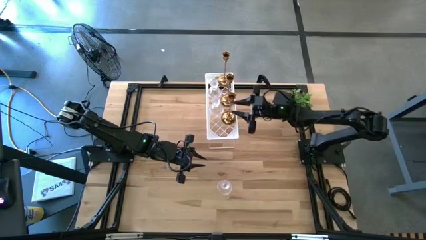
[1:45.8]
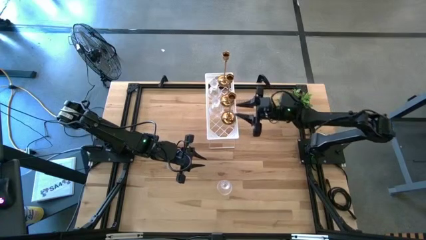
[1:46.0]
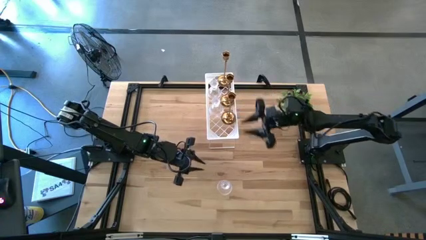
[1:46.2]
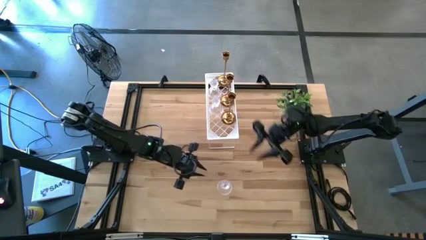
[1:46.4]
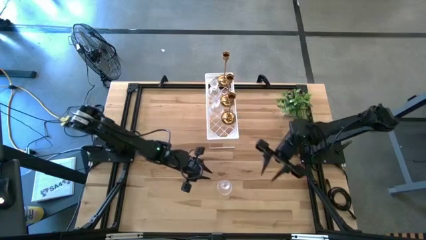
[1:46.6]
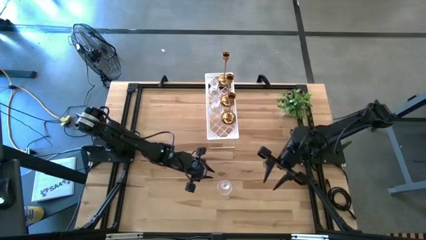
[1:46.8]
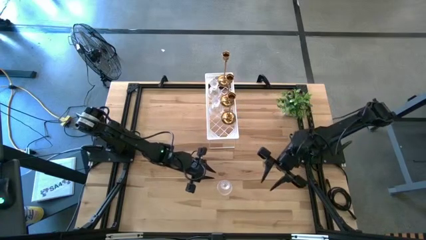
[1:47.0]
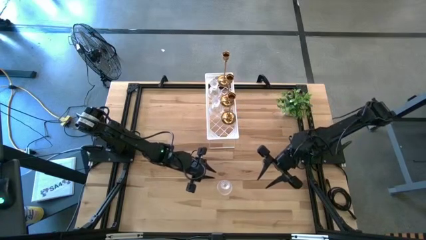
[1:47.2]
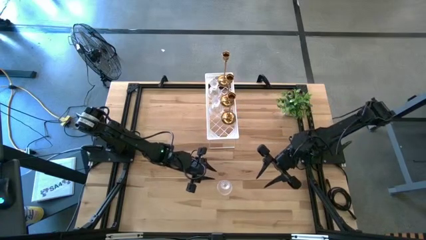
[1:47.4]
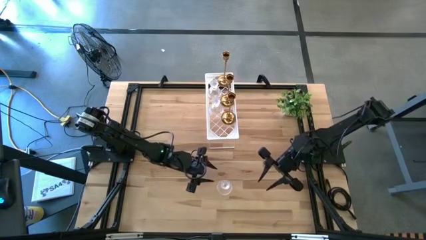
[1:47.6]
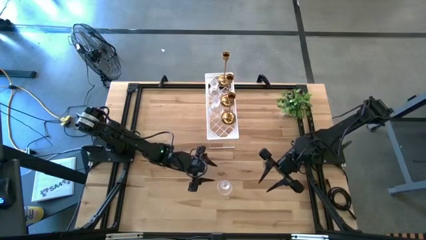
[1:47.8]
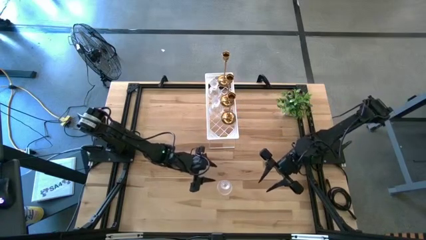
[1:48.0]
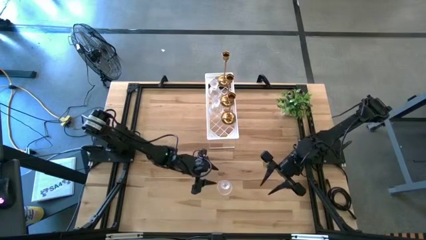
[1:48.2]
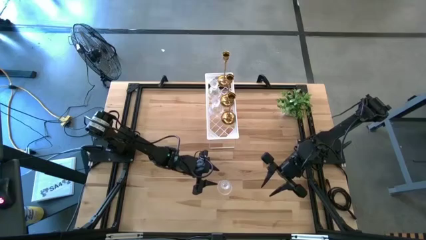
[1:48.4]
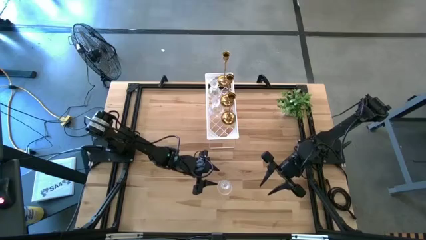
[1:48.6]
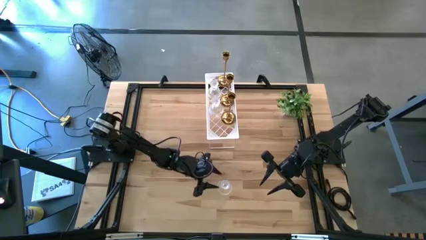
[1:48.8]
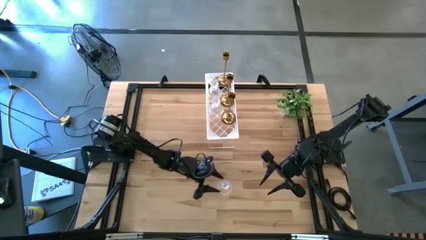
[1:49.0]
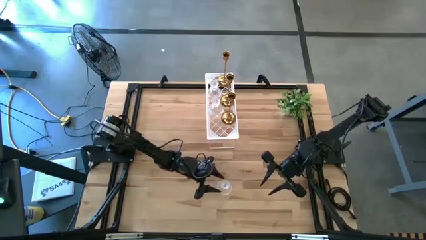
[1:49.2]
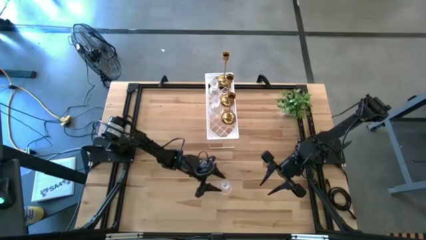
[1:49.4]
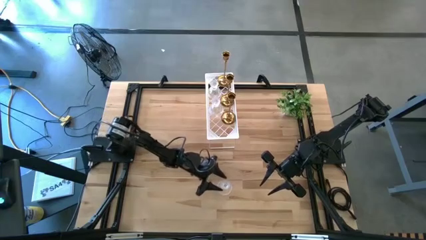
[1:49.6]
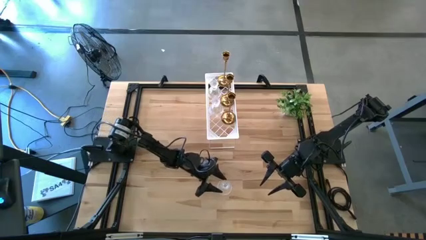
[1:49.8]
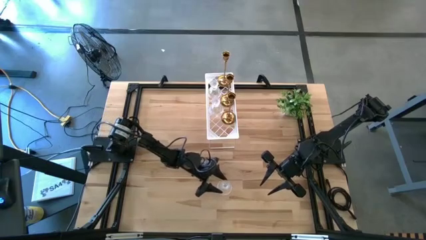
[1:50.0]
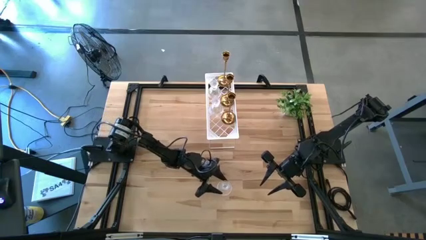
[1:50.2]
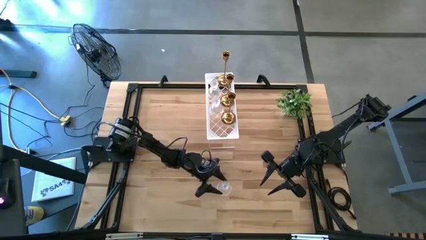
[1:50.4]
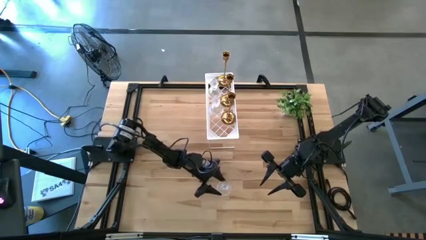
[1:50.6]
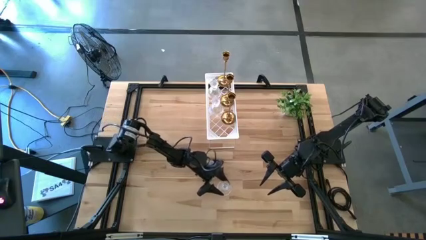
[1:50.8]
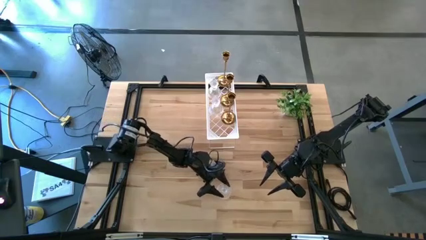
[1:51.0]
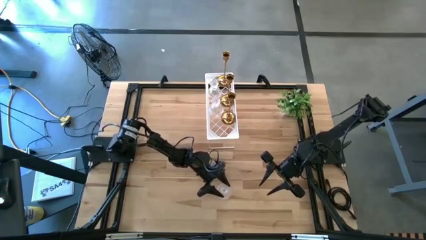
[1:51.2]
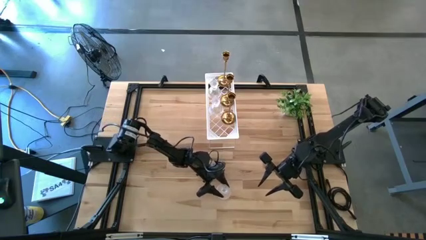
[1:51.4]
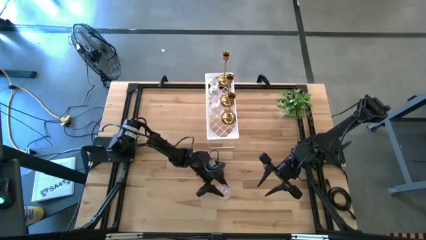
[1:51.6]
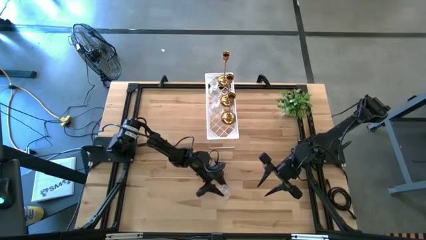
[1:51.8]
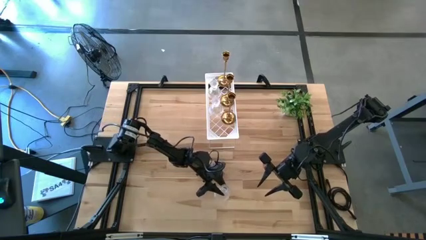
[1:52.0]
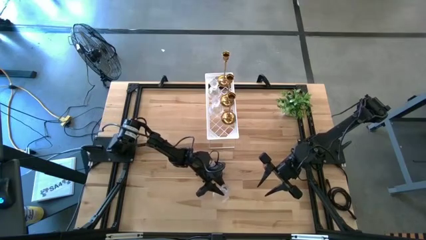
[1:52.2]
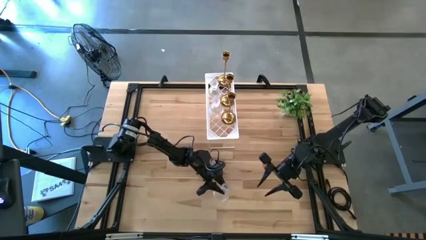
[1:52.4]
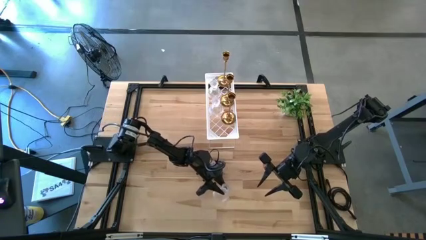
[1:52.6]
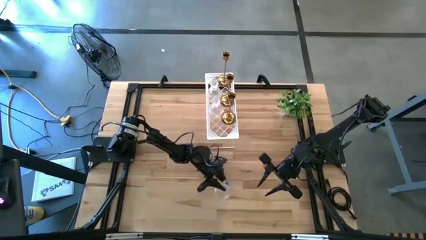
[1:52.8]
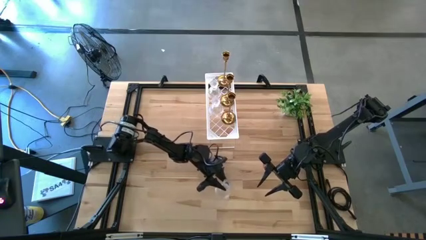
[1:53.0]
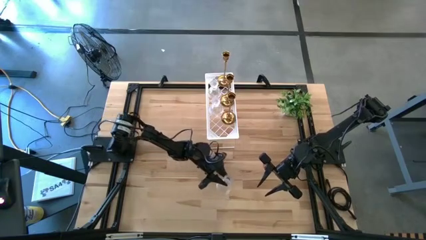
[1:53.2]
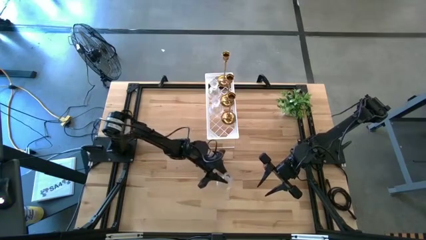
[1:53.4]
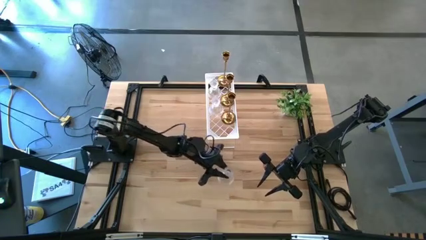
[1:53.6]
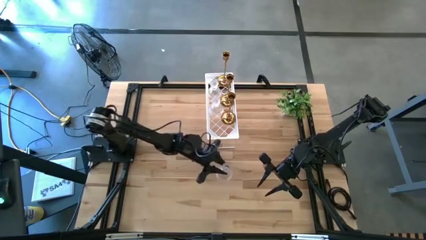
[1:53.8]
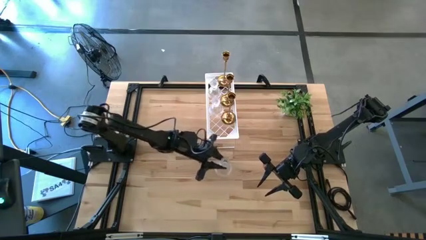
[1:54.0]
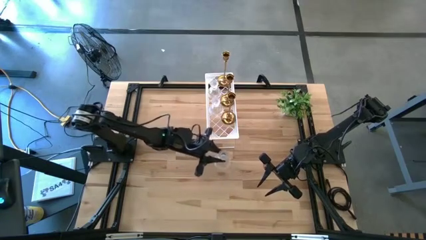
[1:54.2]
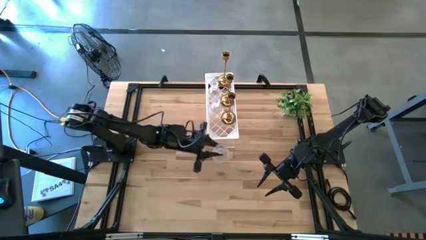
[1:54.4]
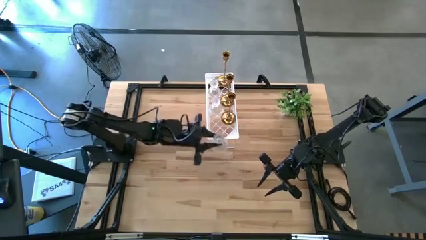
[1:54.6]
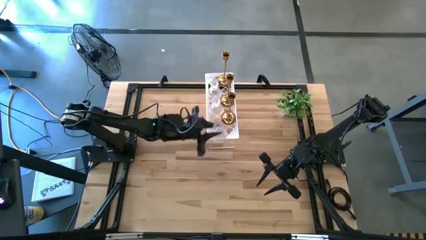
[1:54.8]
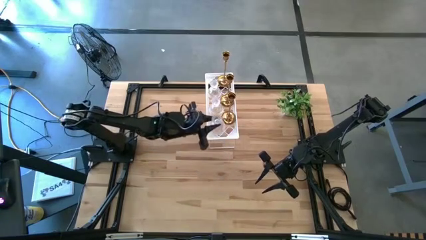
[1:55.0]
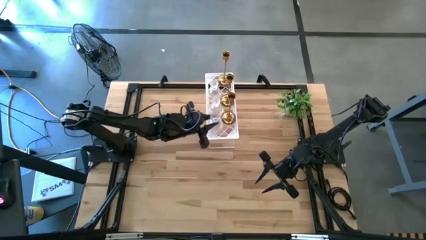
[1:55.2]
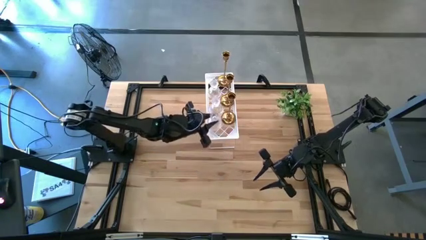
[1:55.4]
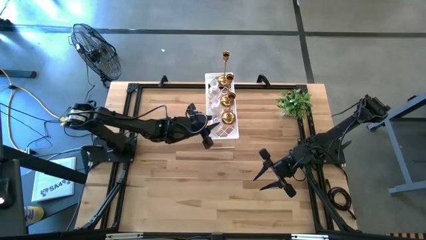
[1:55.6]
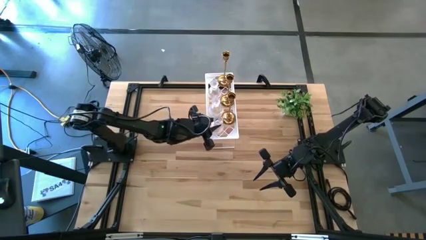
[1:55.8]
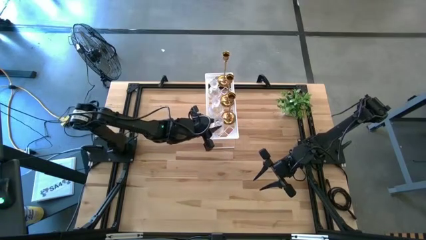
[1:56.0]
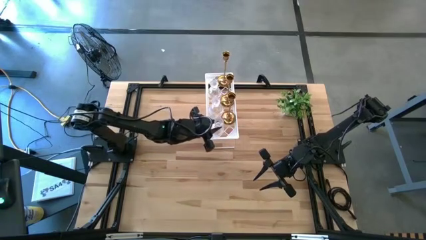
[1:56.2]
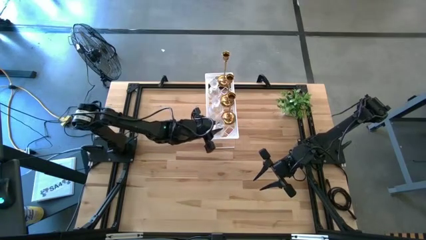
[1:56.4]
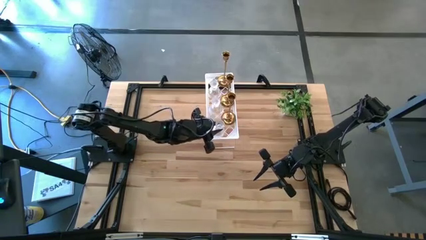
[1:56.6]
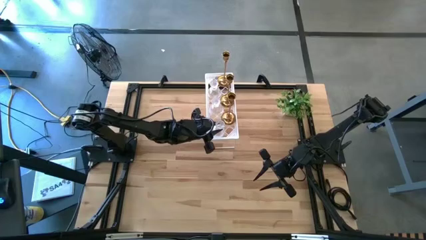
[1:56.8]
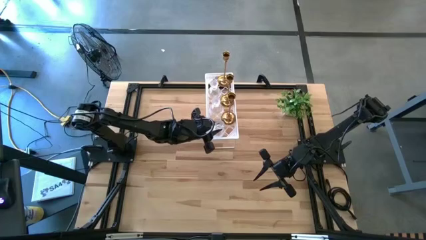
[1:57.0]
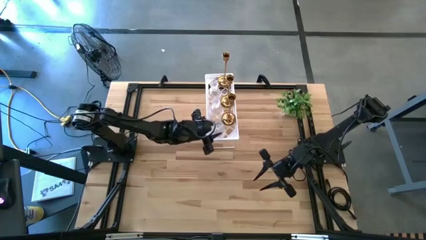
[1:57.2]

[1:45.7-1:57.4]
Task: Pick & Place candle stick holders
Put the transparent candle holder on the shelf aligned with the other transparent candle holders
